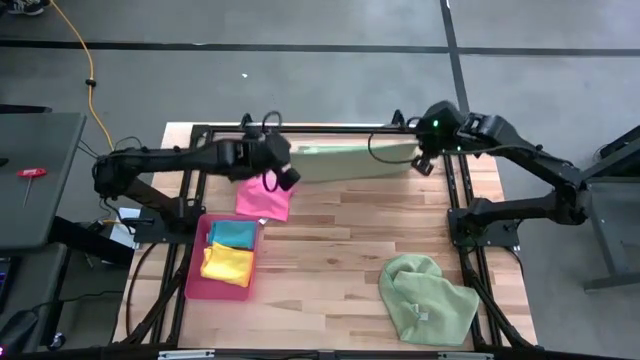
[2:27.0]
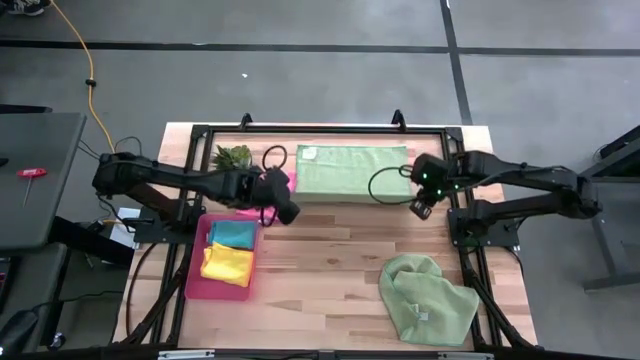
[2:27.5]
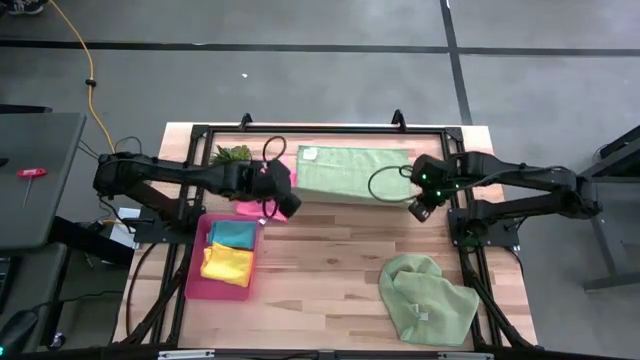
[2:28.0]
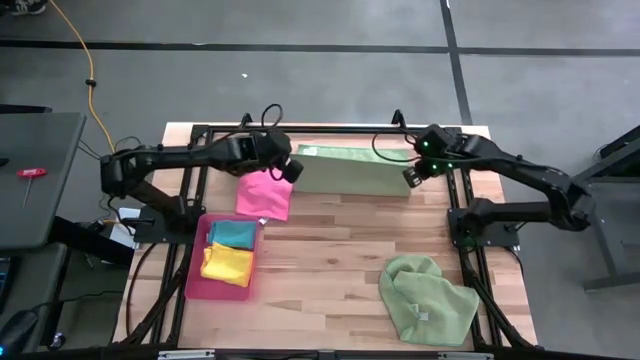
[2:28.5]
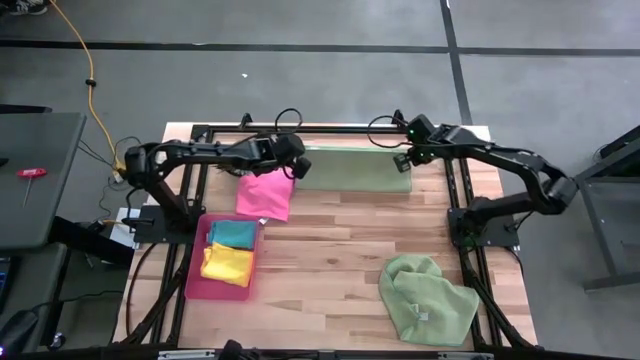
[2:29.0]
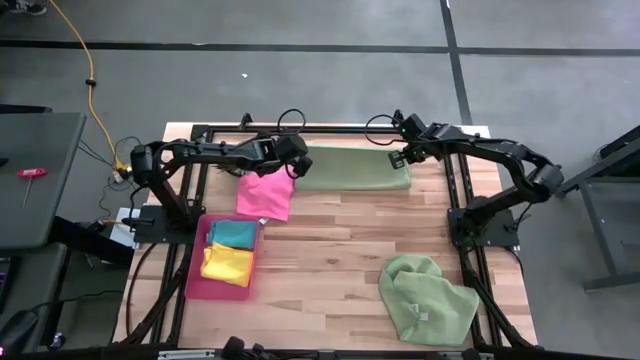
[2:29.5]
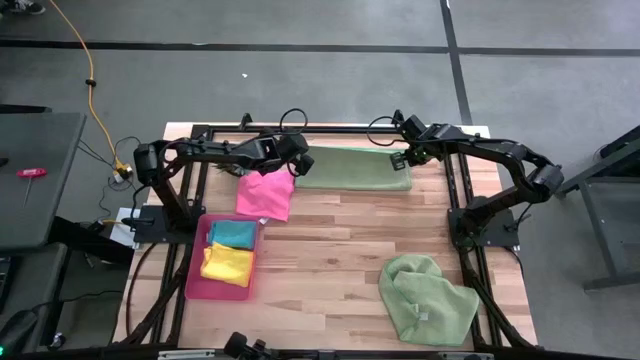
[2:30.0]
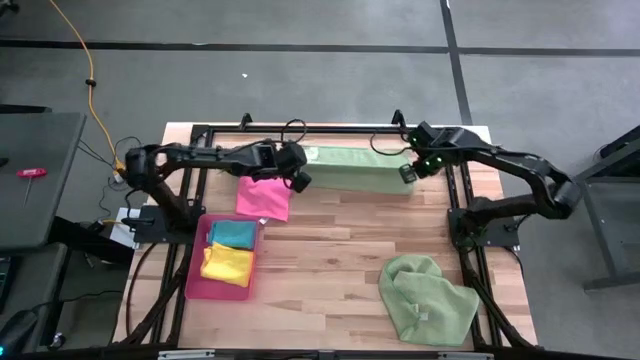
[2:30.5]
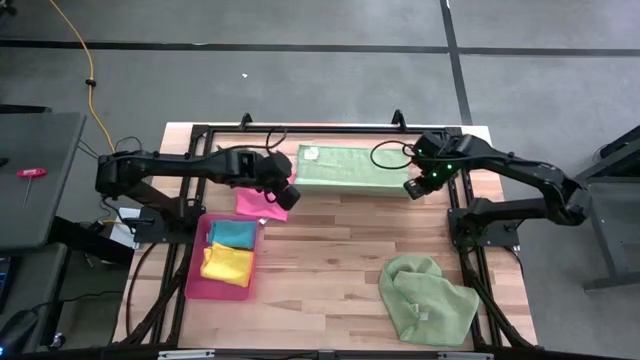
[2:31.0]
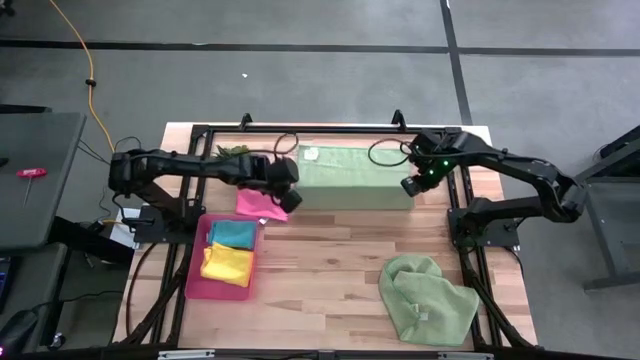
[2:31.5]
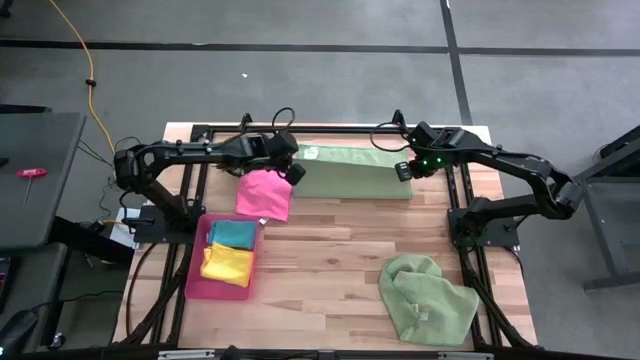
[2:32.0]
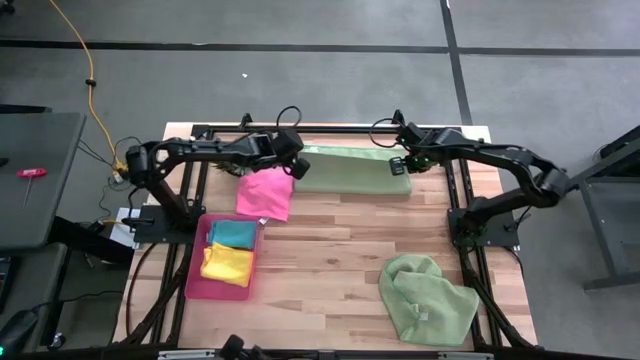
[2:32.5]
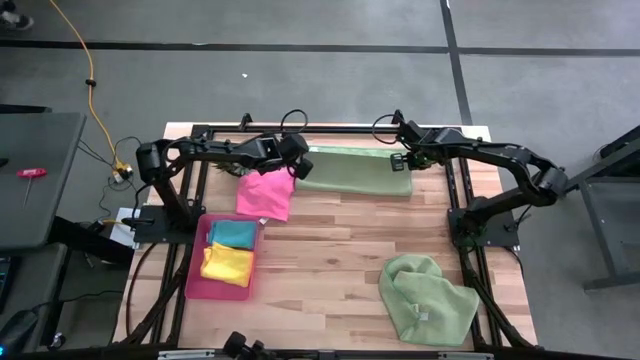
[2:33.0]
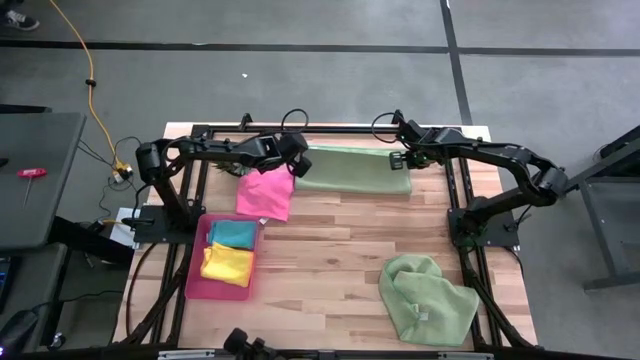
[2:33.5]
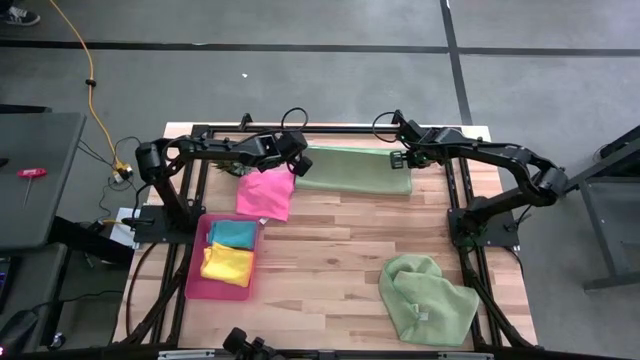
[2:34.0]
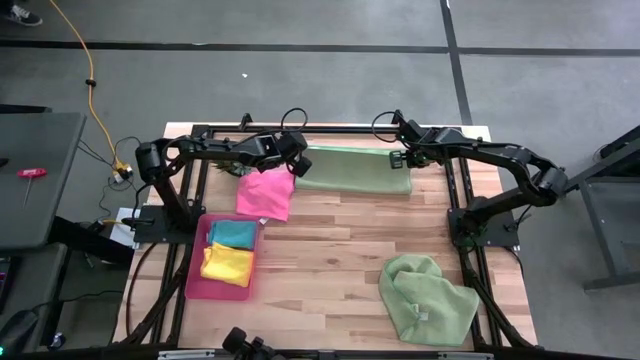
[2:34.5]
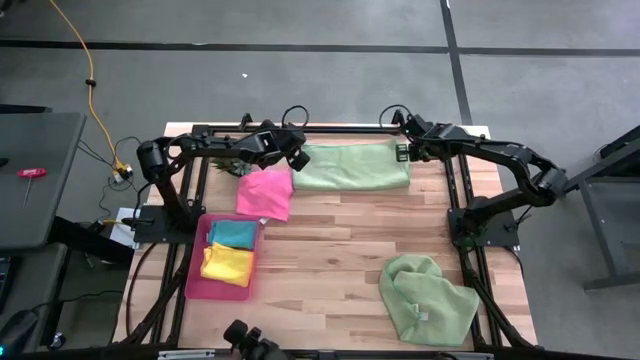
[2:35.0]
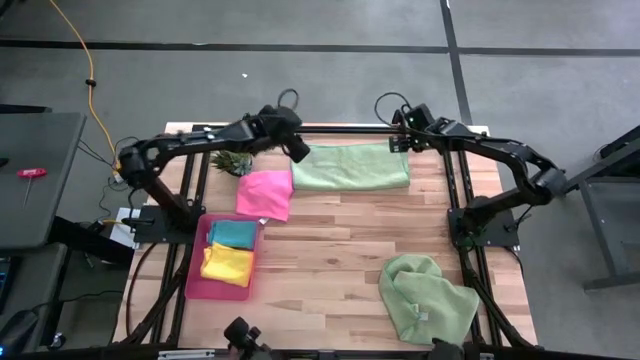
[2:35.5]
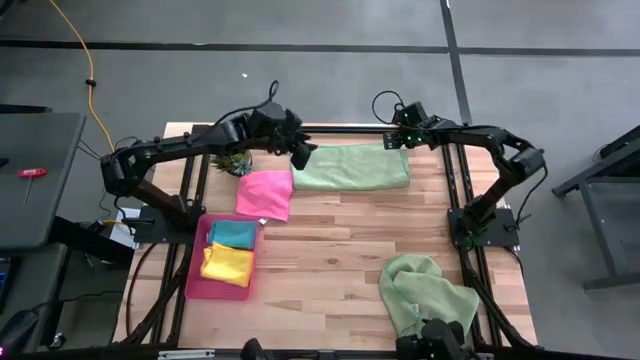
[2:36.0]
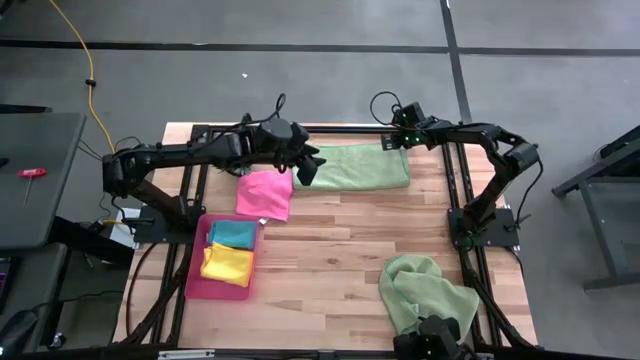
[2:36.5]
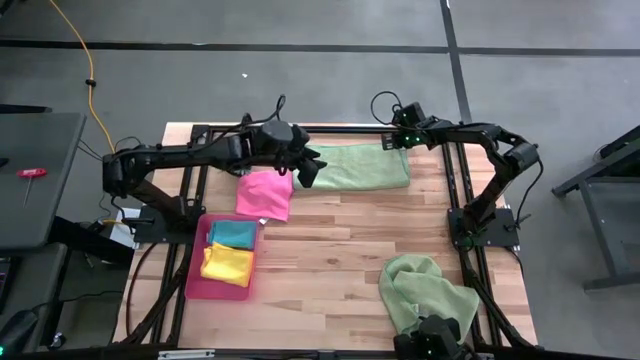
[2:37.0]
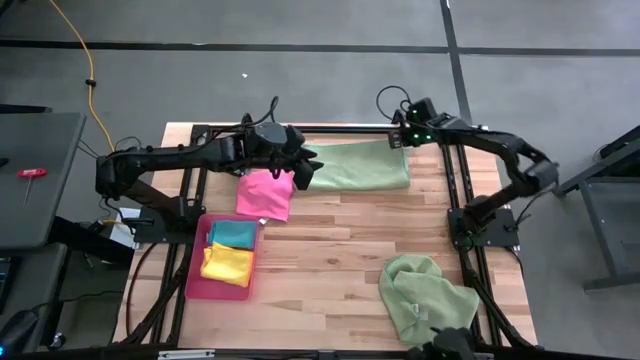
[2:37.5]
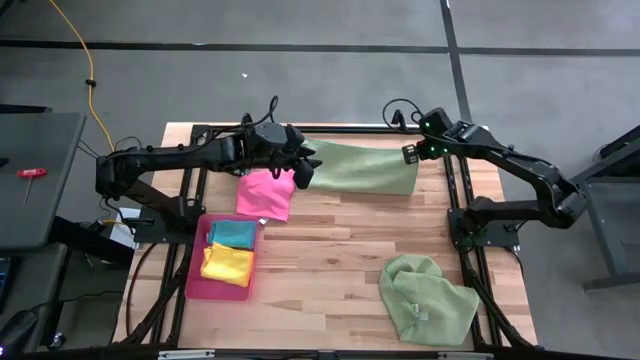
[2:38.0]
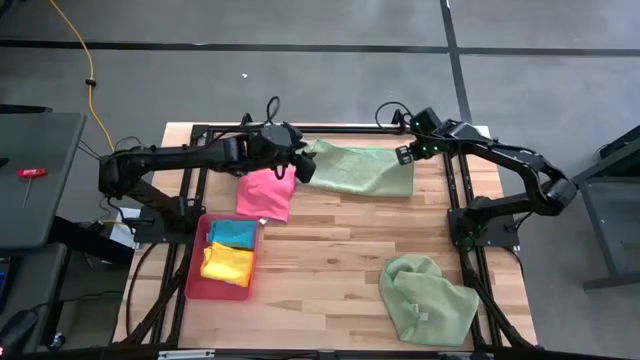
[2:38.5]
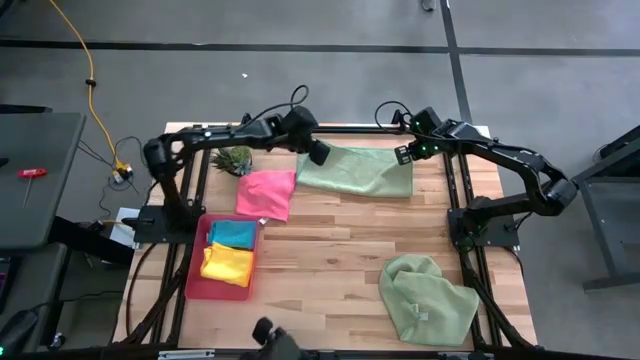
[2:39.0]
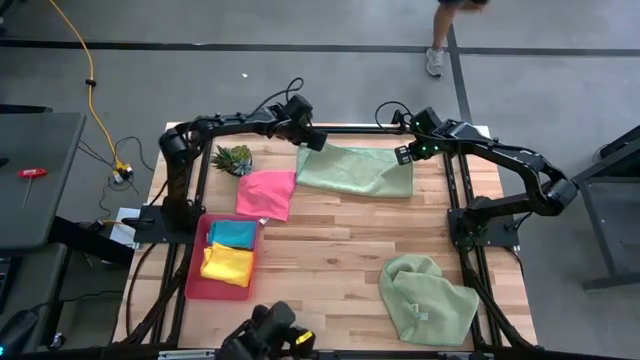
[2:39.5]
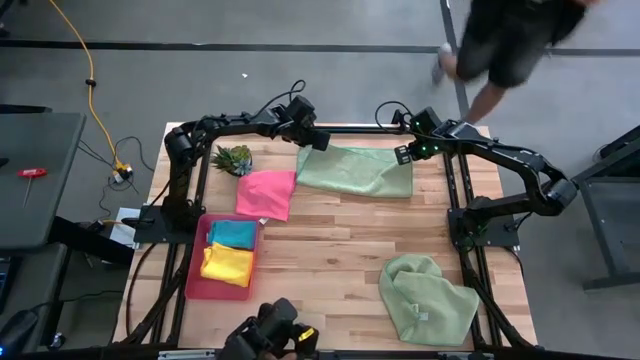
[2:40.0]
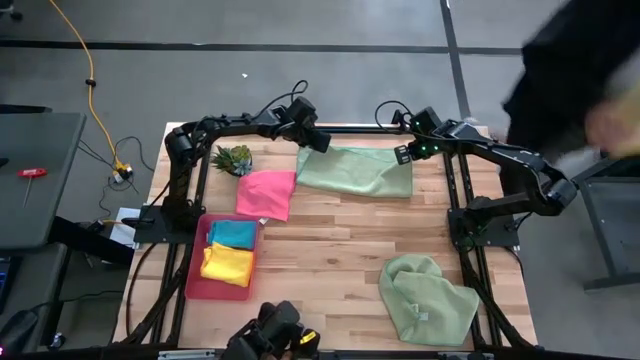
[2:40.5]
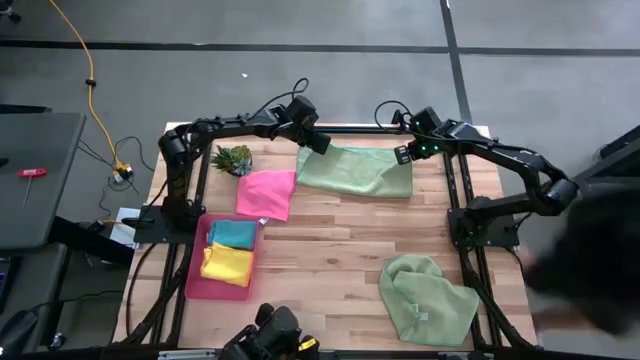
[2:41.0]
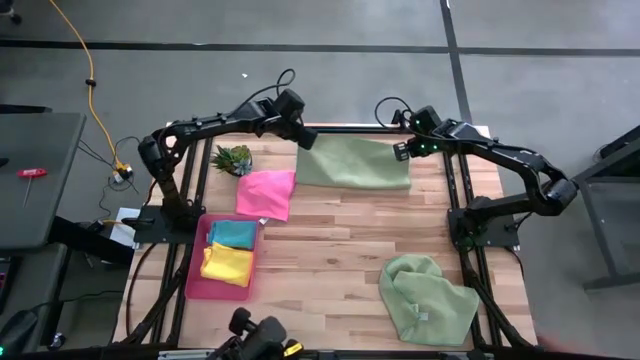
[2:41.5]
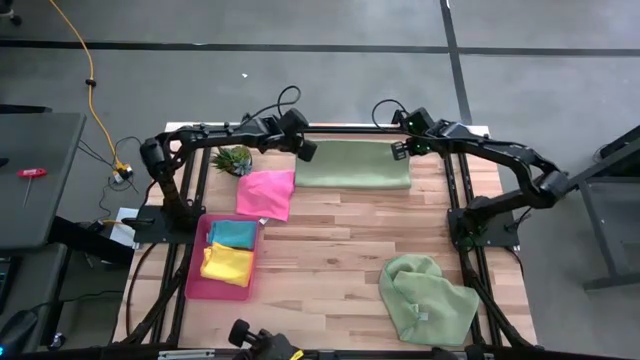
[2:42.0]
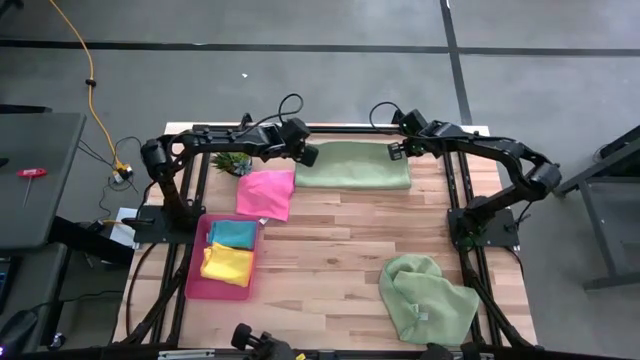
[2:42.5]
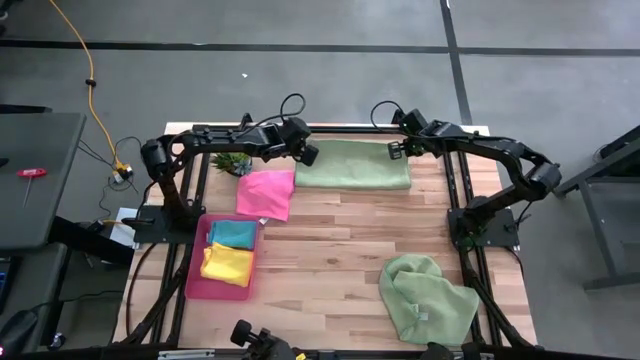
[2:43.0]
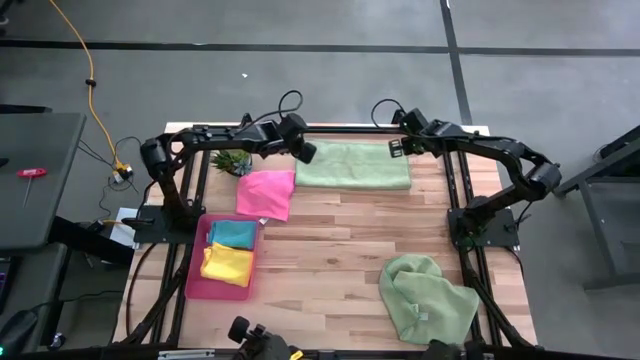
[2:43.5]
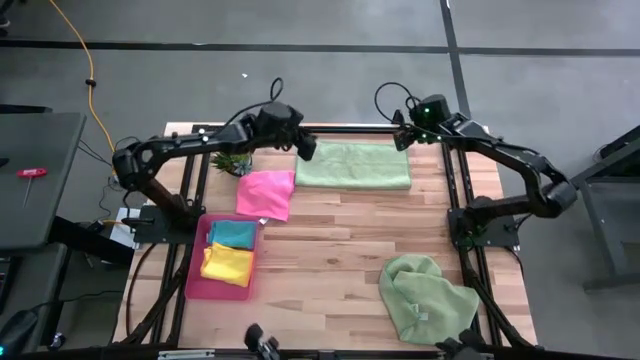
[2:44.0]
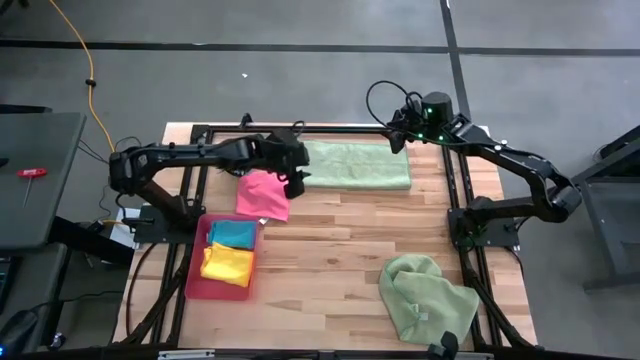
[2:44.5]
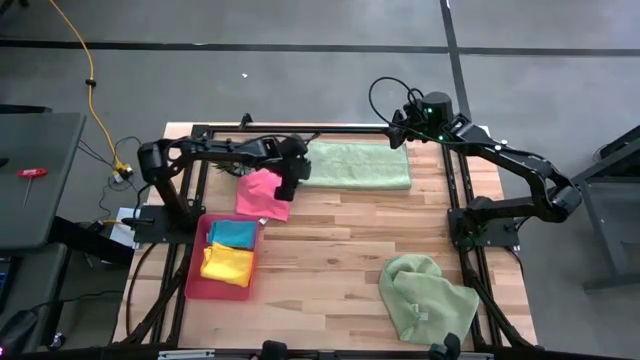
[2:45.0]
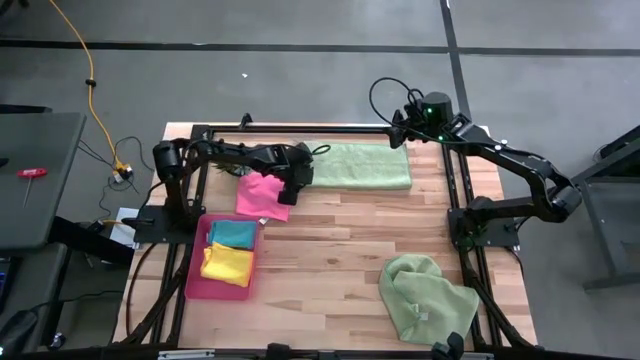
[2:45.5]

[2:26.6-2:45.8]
Task: Fold microfiber towels
Fold the top green microfiber towel
